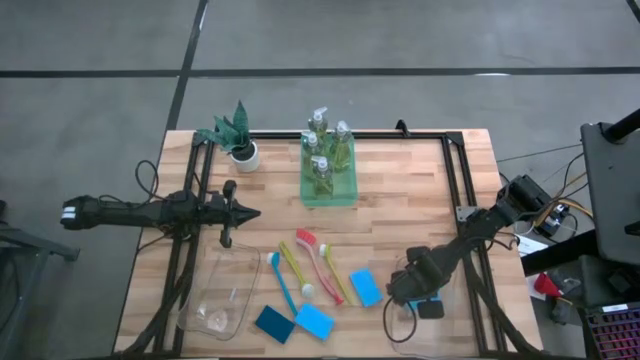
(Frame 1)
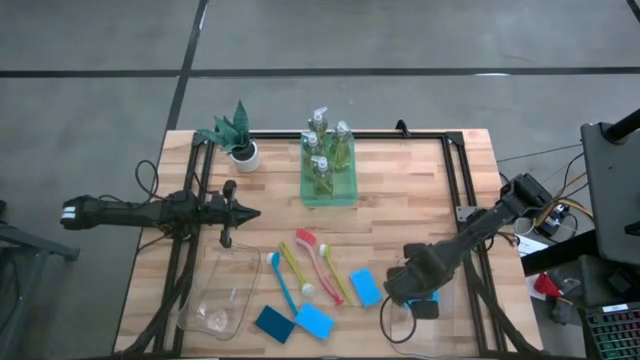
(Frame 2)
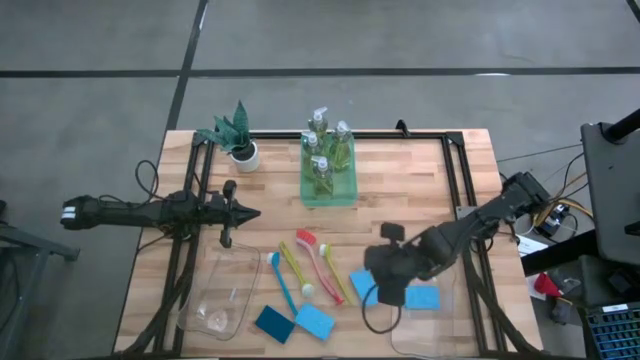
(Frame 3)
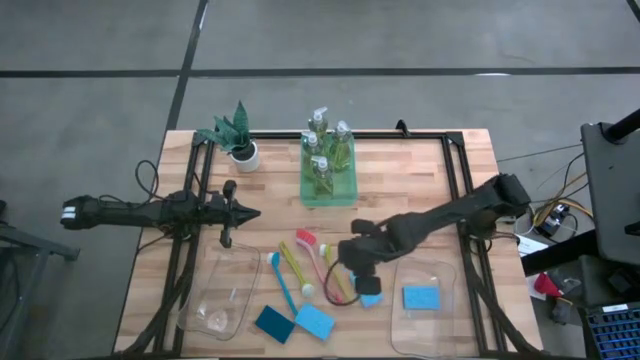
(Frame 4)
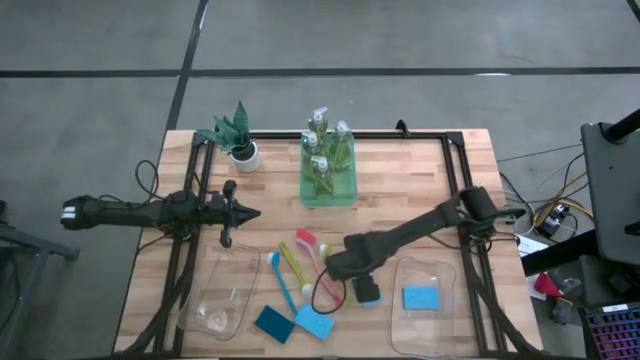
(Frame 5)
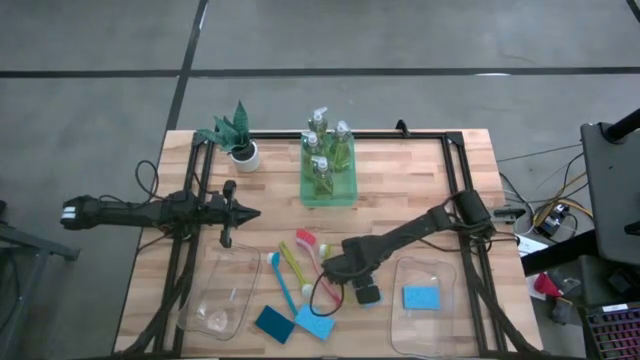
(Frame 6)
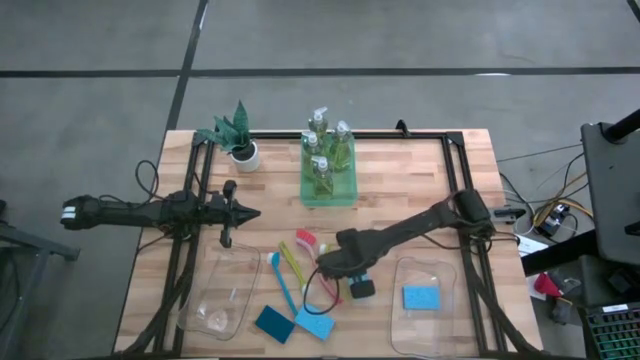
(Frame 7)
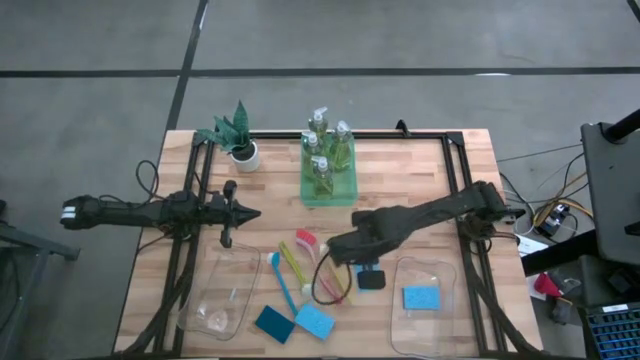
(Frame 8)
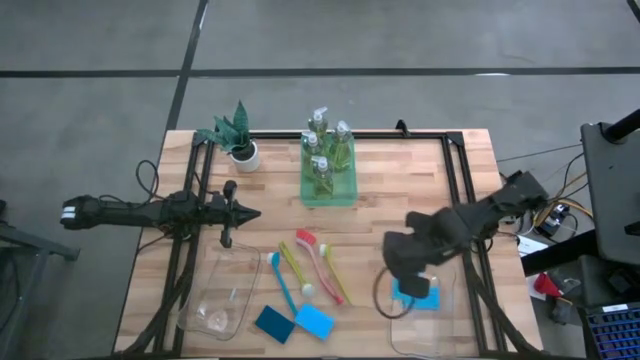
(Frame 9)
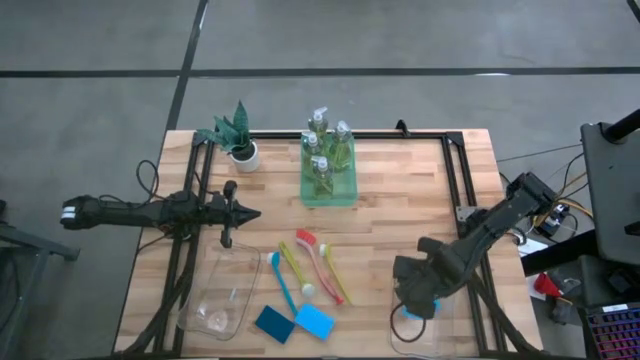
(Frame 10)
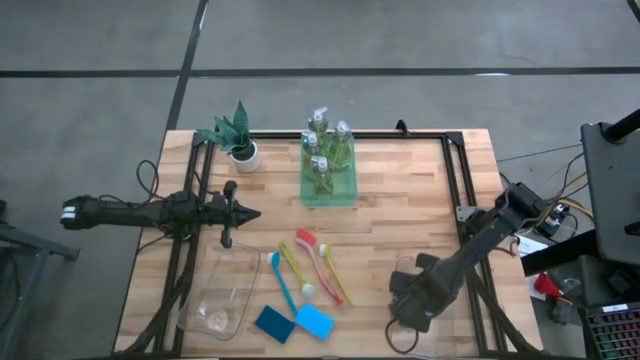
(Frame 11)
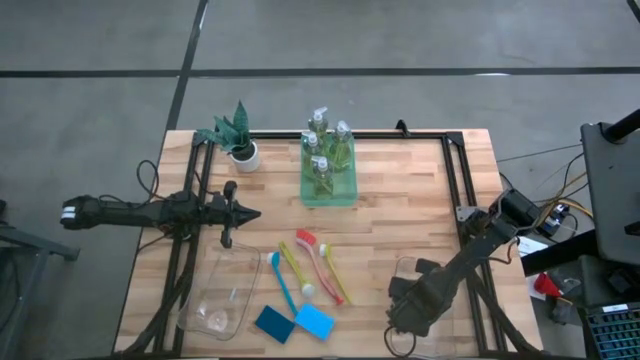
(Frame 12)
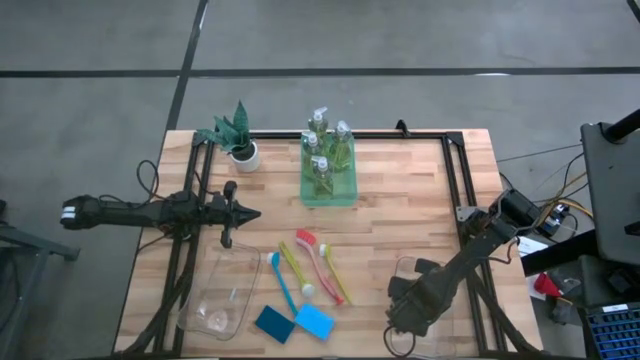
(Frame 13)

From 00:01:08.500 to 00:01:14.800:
Task: Pick & Place Kitchen Sink Supplies
Put the top right blue sponge into the right transparent bin

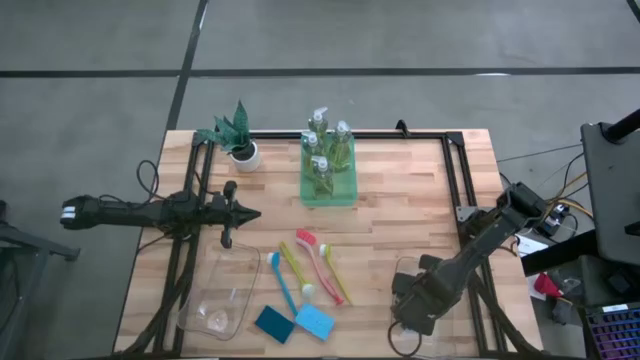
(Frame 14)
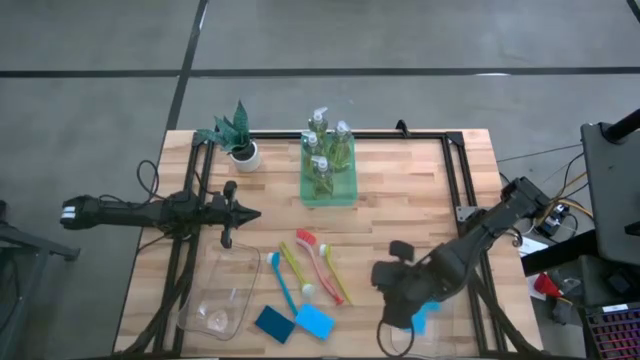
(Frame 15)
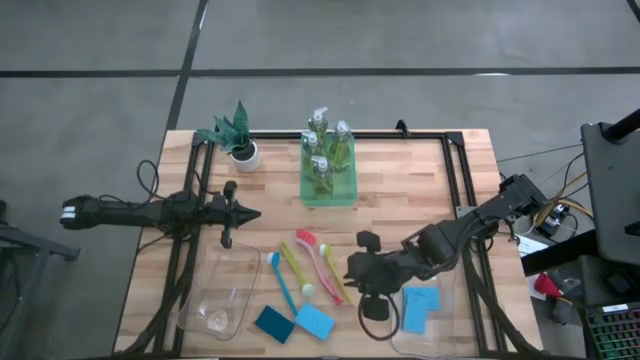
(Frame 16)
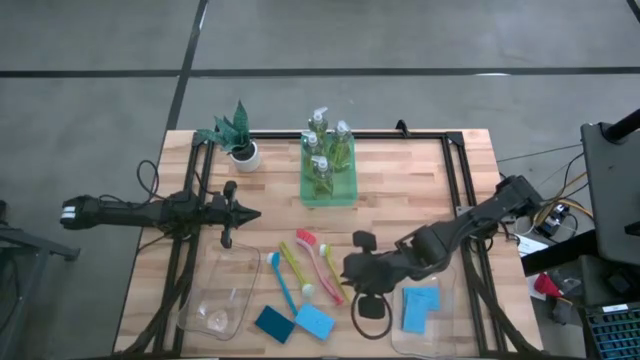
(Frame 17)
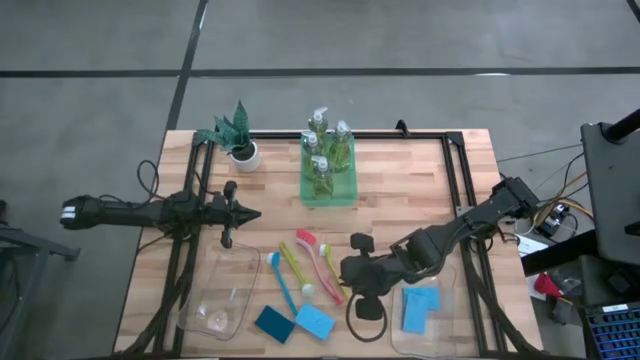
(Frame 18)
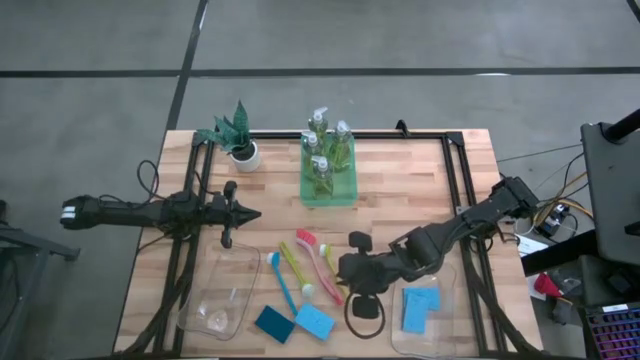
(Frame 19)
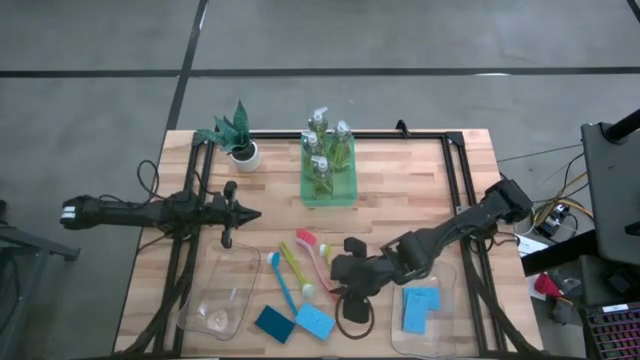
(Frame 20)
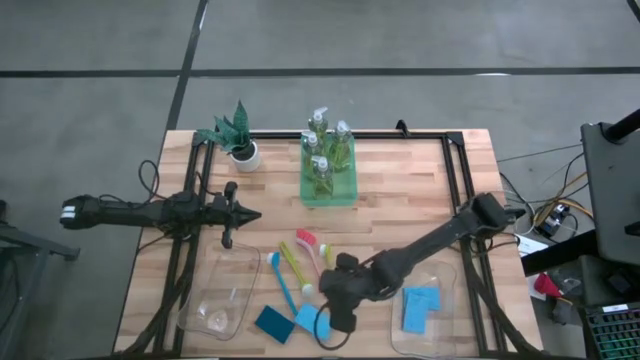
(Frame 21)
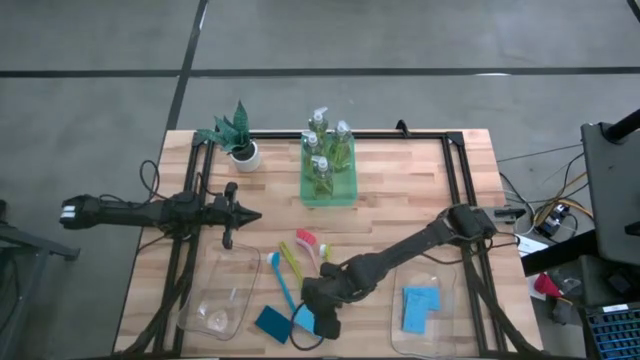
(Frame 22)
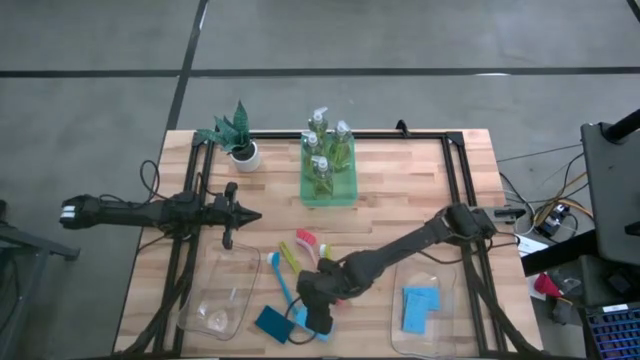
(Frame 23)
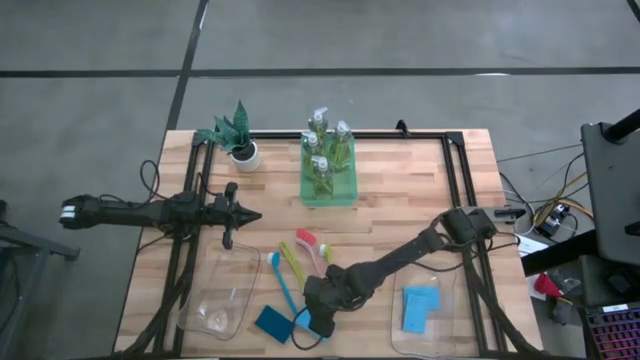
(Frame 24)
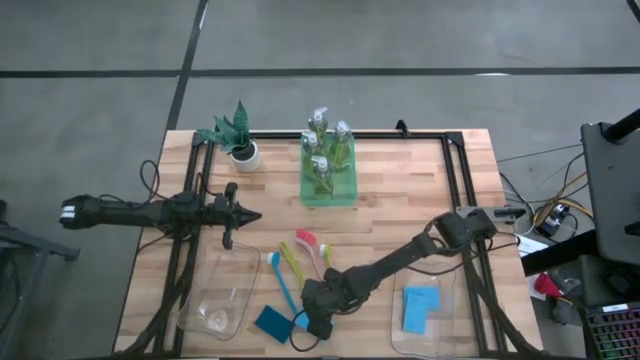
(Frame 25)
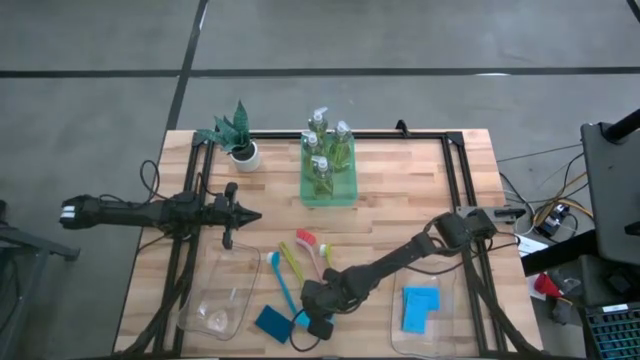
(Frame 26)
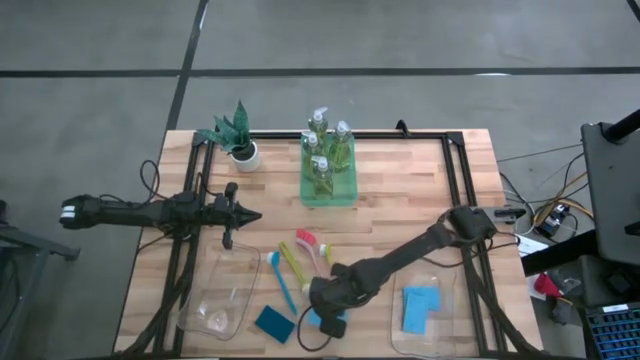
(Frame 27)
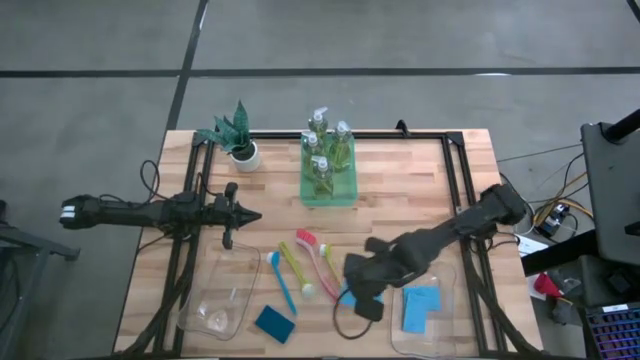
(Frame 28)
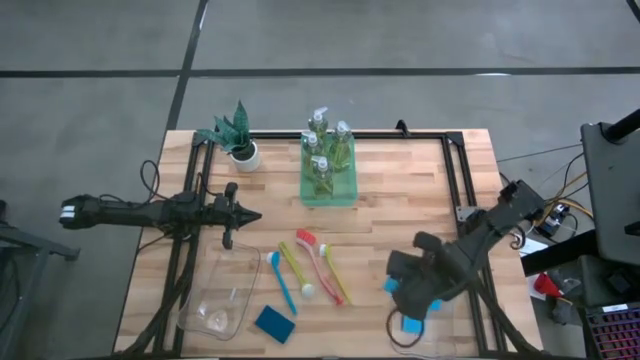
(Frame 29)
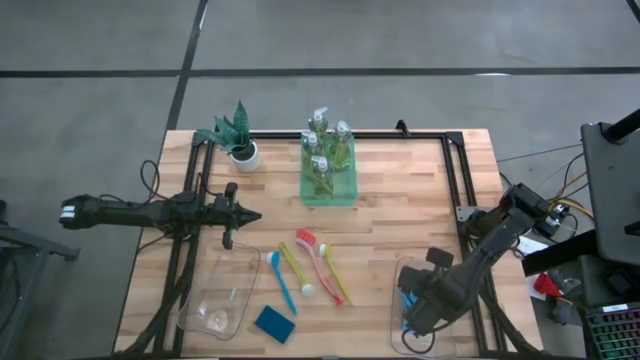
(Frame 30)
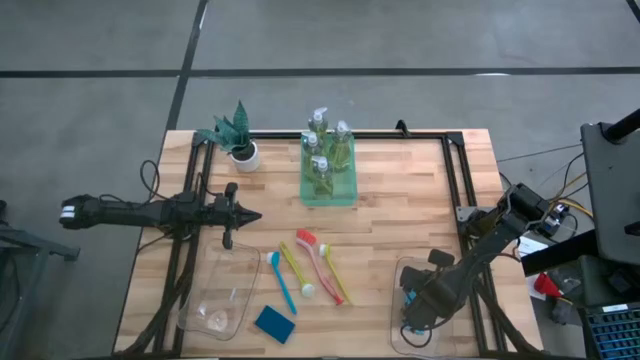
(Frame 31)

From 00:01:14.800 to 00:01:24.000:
Put the right blue sponge into the right transparent bin

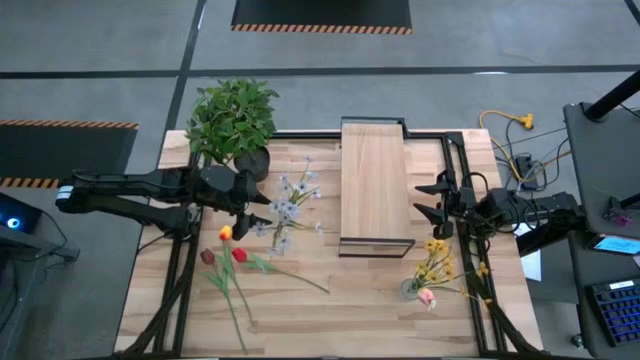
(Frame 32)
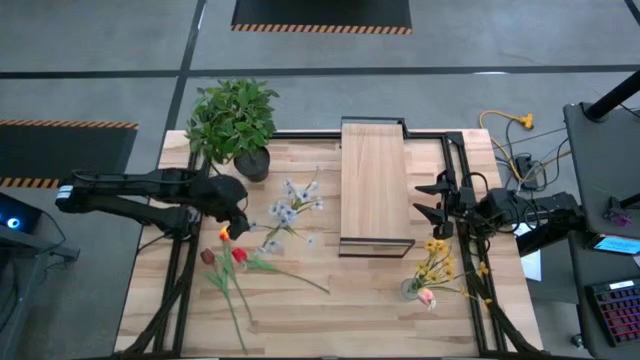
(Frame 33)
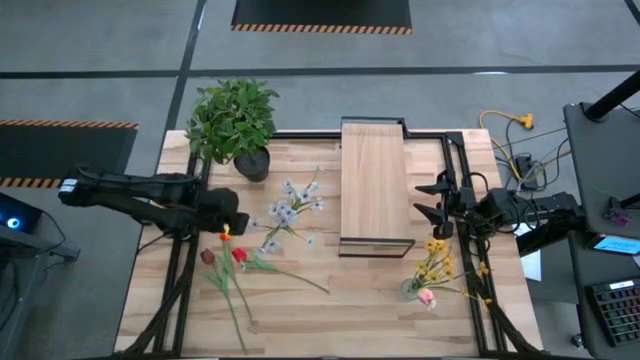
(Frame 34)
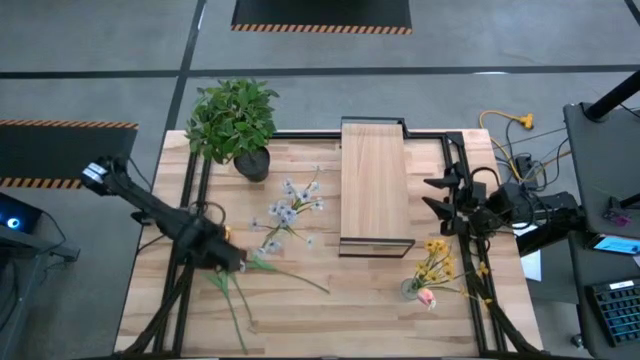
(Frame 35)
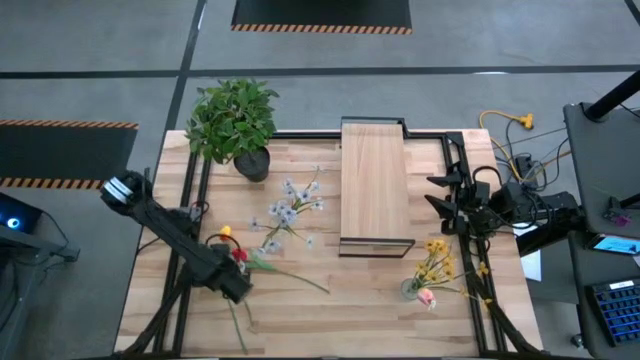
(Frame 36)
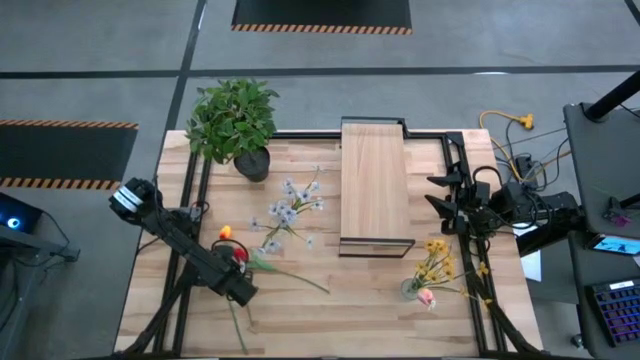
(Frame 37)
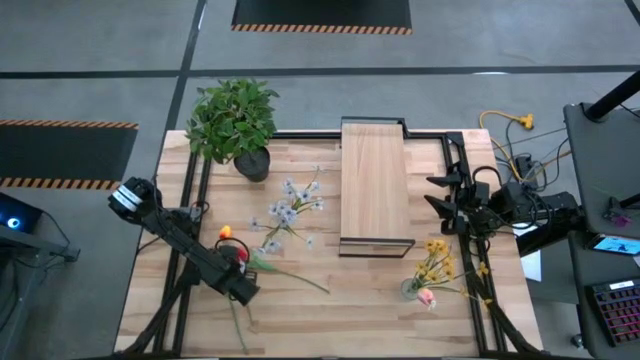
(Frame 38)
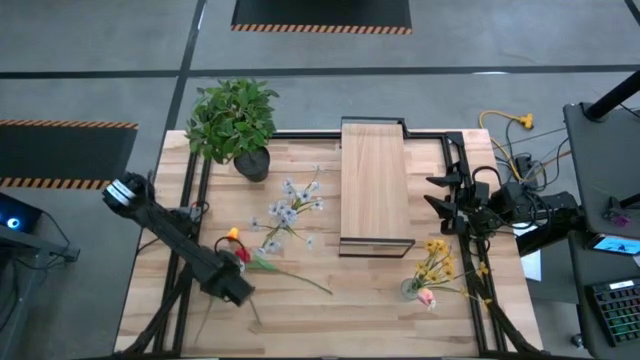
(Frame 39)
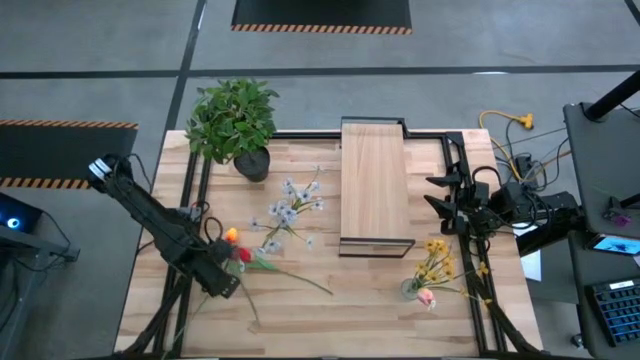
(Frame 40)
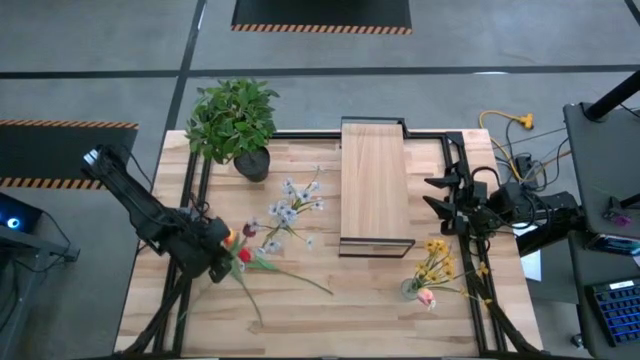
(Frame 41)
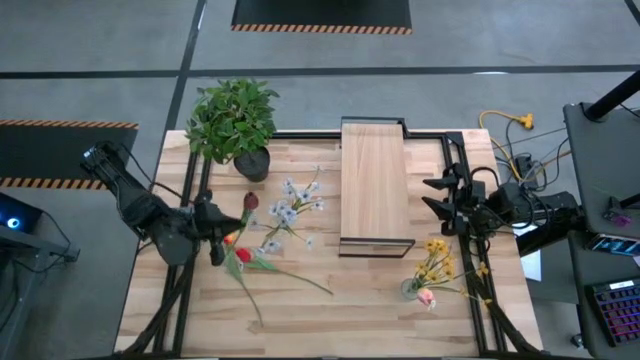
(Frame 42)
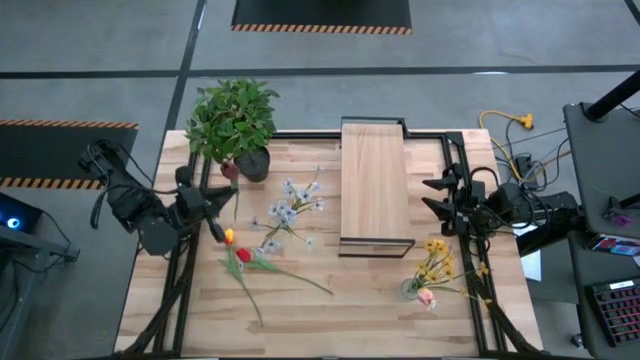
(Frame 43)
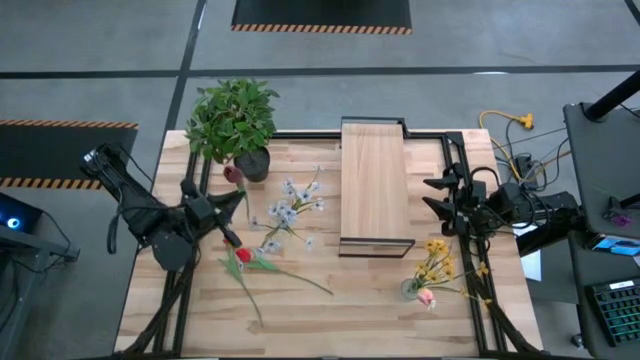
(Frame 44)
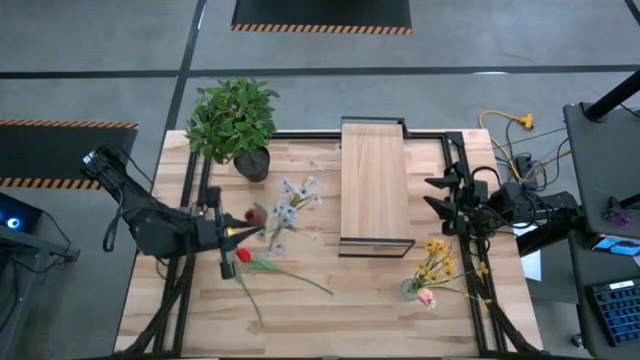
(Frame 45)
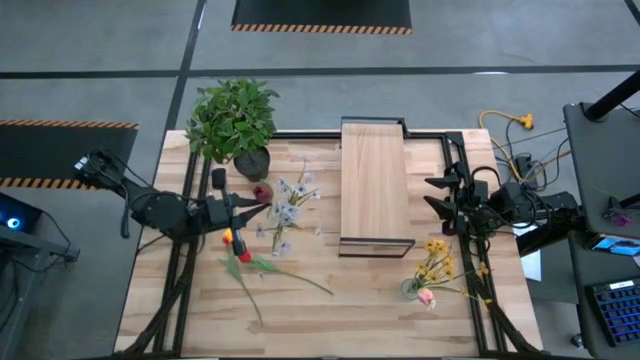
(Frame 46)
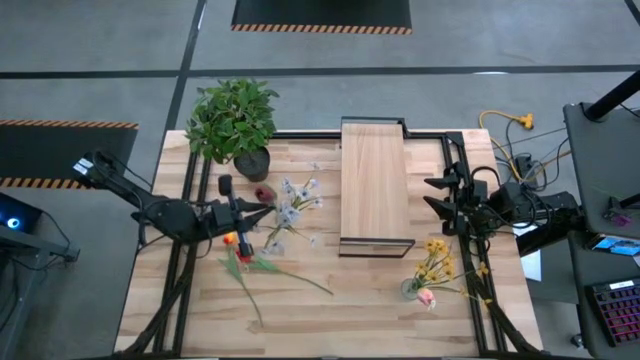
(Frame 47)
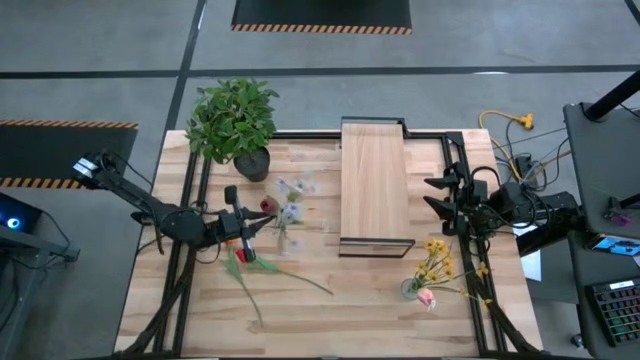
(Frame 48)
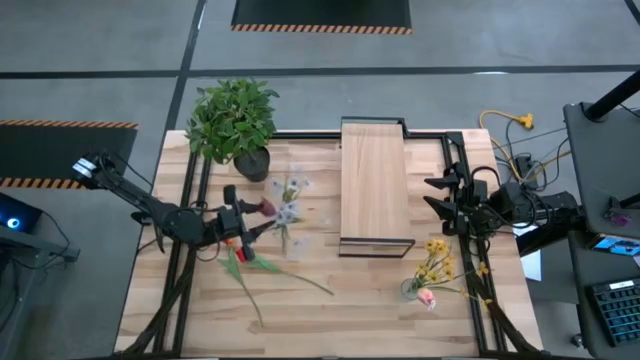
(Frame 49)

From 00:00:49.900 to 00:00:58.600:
Task: Pick and place flowers into a vace then onto a shelf
Put the maroon tulip into the left transparent glass vase
